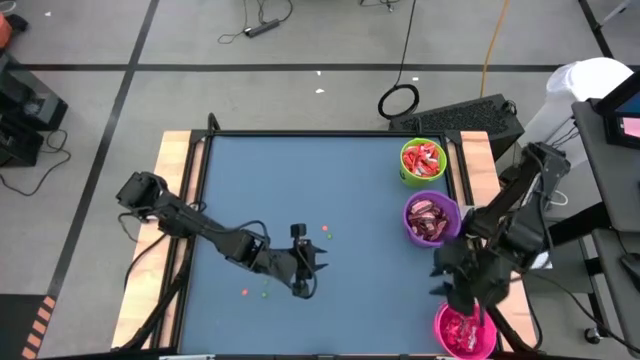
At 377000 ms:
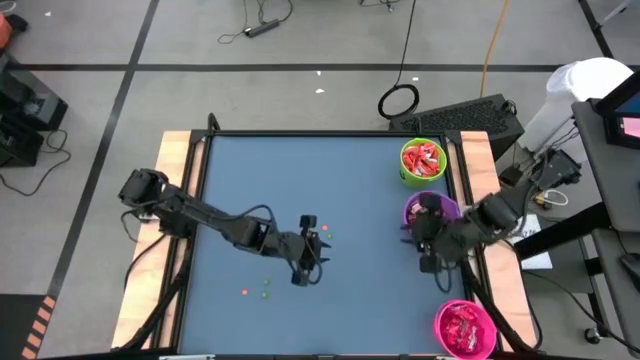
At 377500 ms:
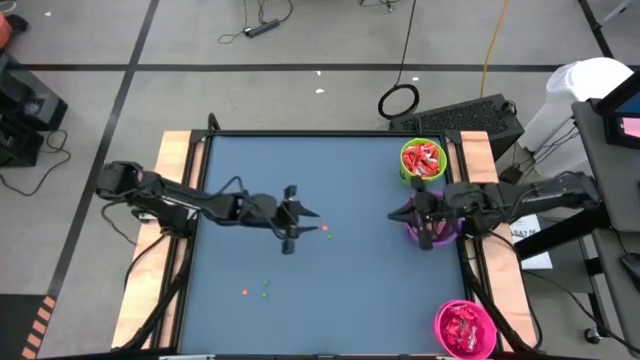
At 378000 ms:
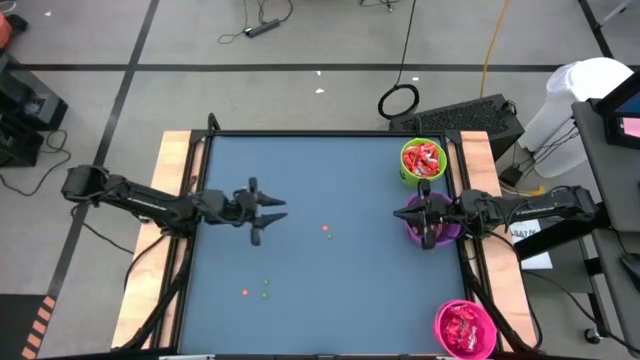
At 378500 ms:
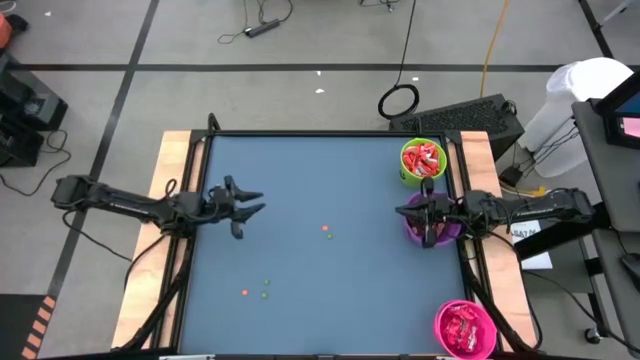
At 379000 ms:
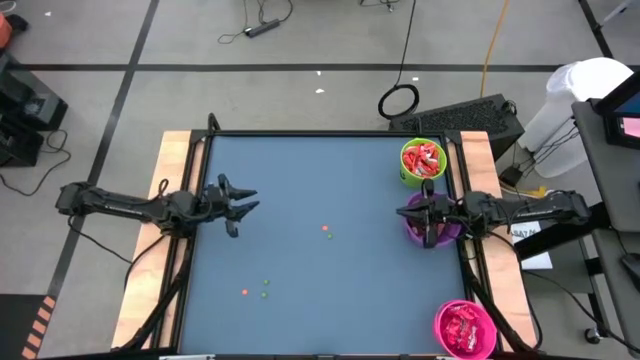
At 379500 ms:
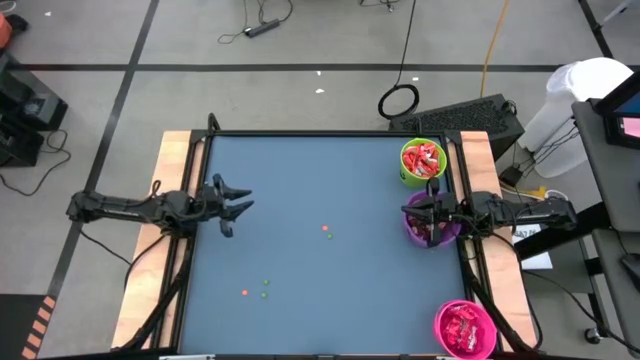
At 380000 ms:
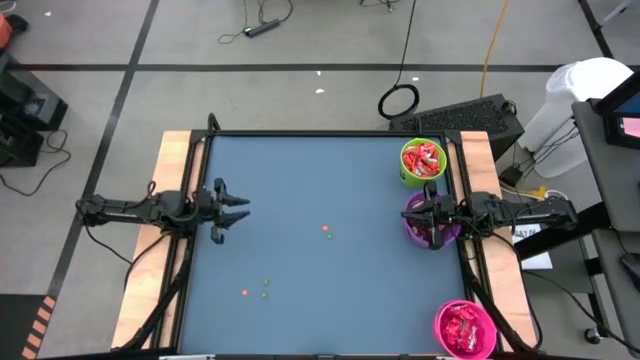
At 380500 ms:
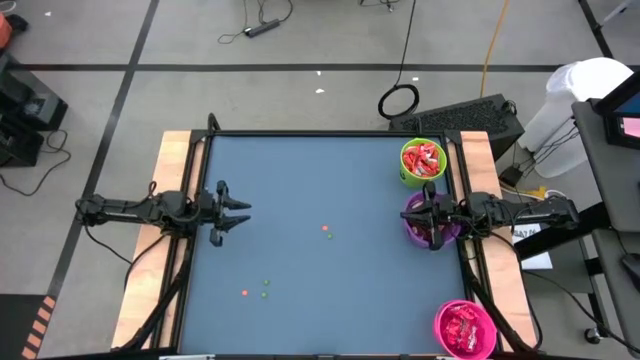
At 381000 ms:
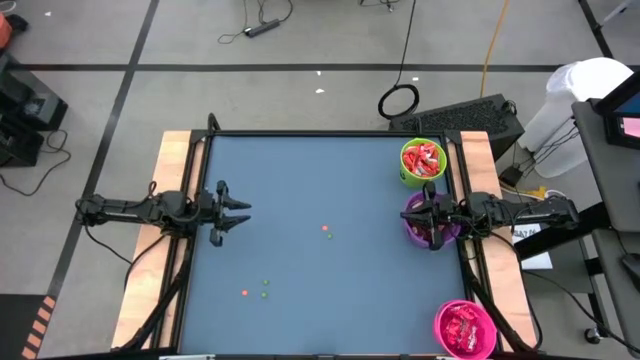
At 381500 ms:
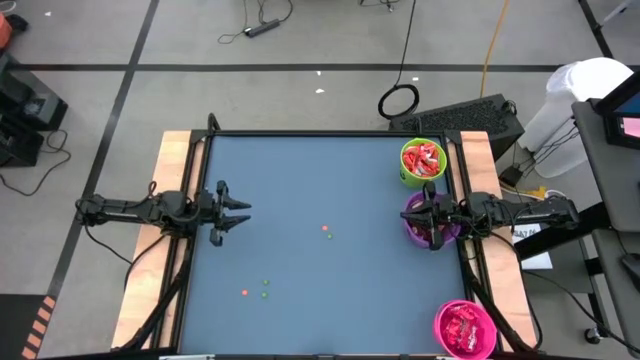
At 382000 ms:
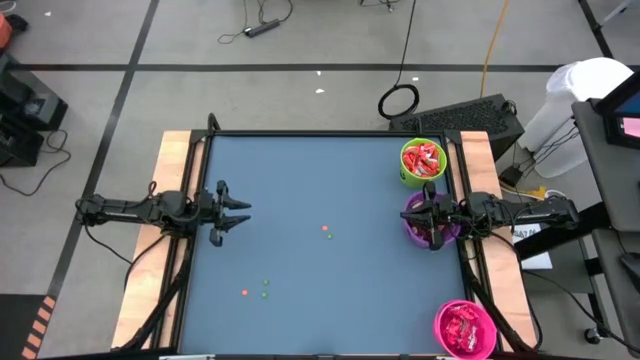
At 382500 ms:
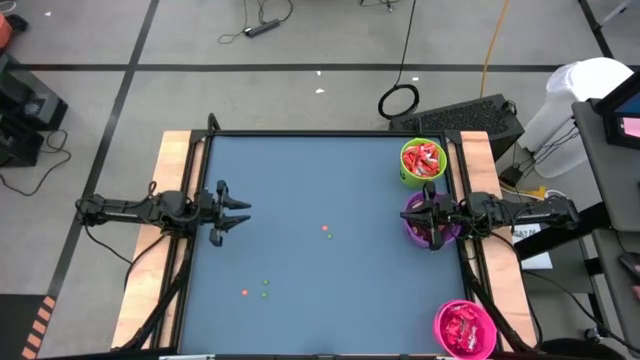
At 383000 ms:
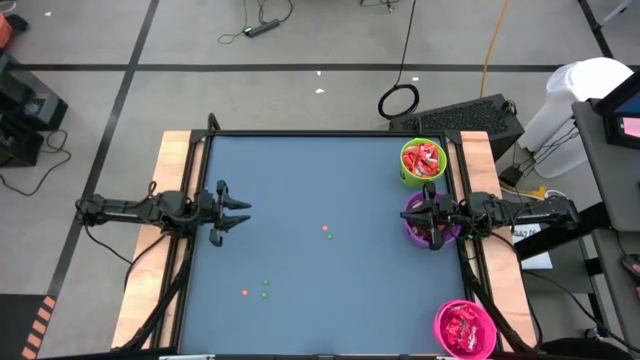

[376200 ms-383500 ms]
Task: Organize candy in baskets
Return to Home Position

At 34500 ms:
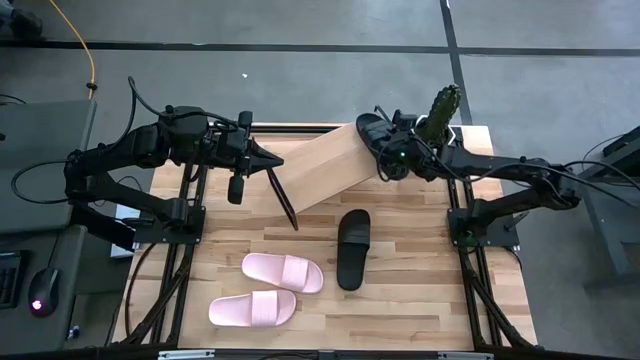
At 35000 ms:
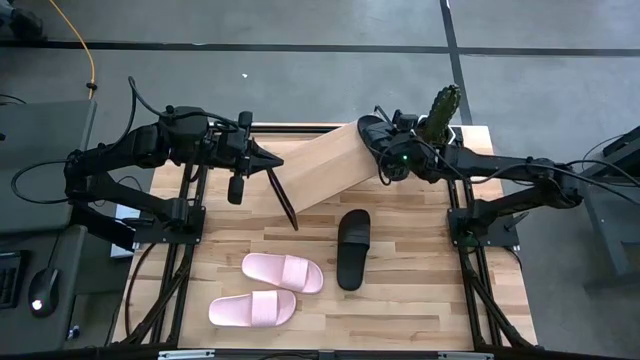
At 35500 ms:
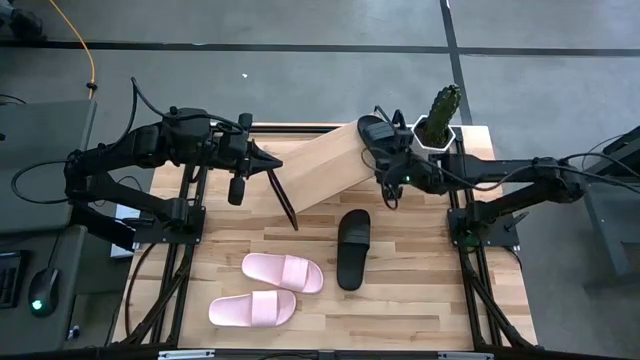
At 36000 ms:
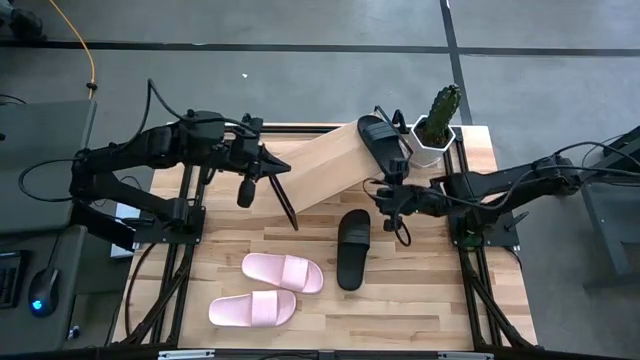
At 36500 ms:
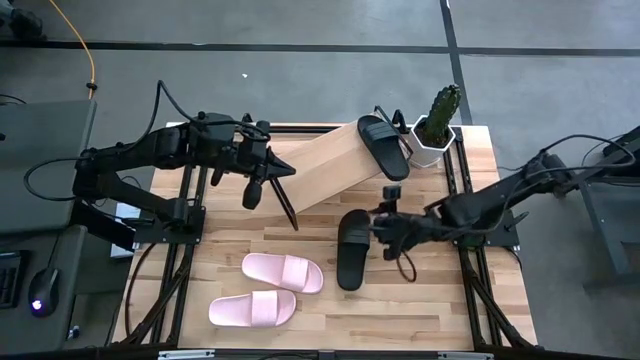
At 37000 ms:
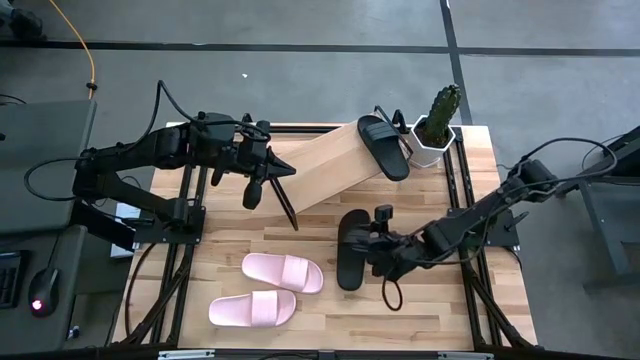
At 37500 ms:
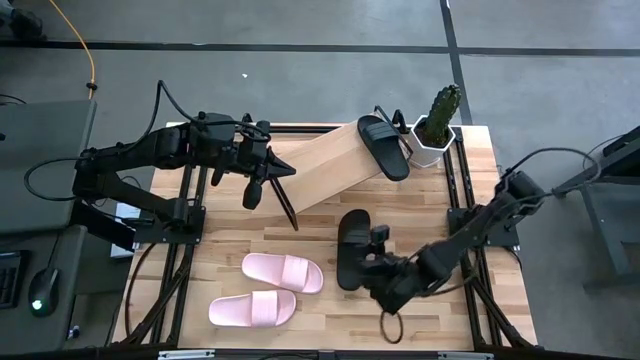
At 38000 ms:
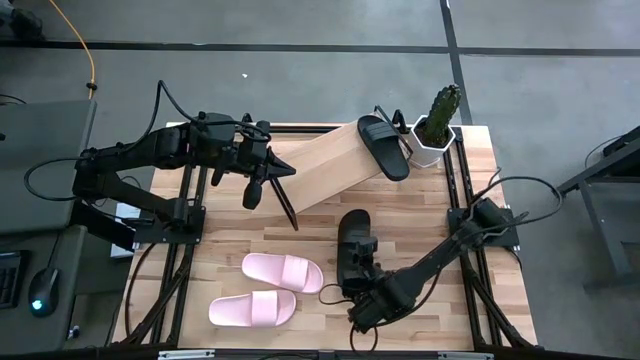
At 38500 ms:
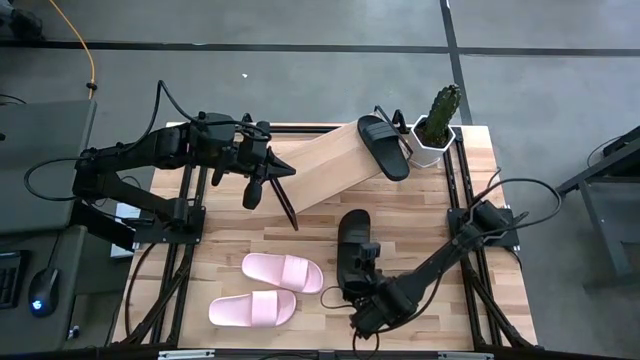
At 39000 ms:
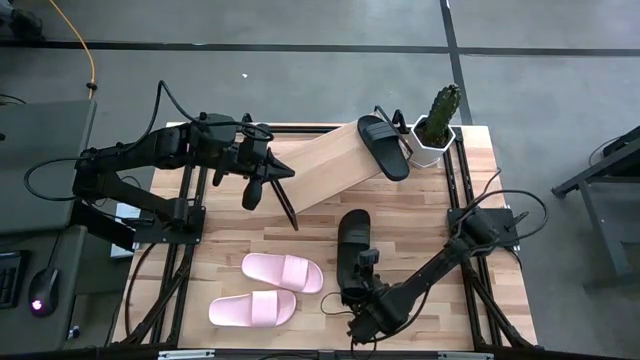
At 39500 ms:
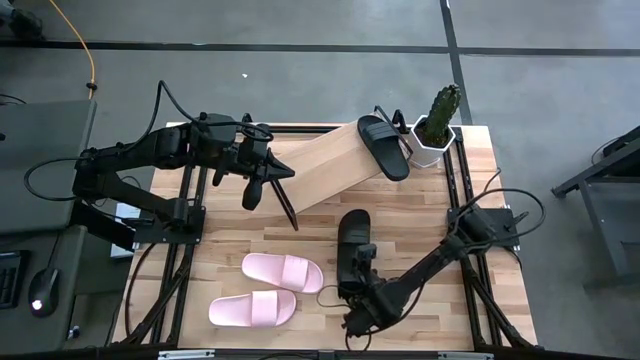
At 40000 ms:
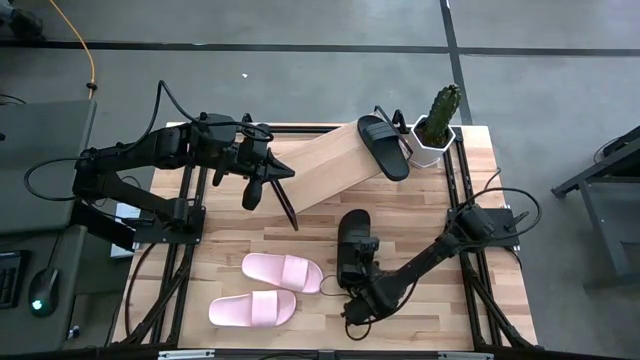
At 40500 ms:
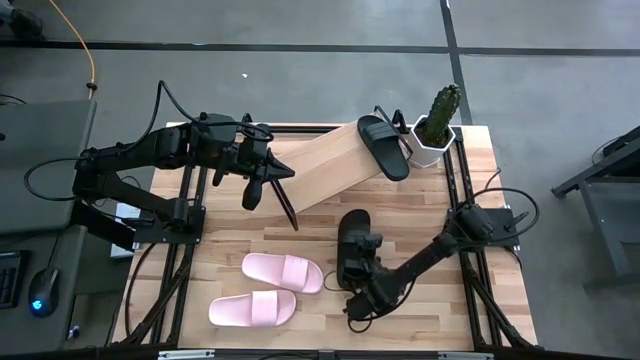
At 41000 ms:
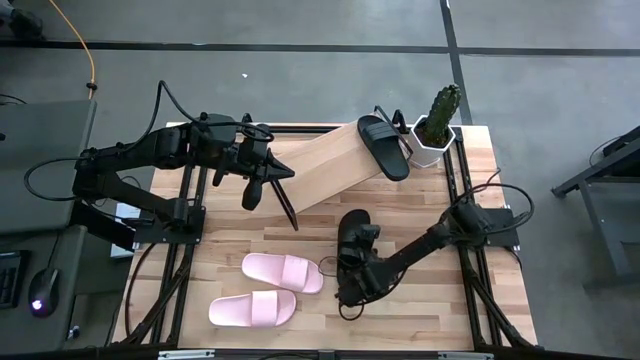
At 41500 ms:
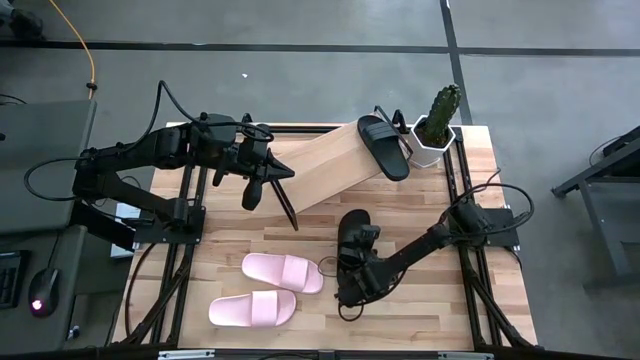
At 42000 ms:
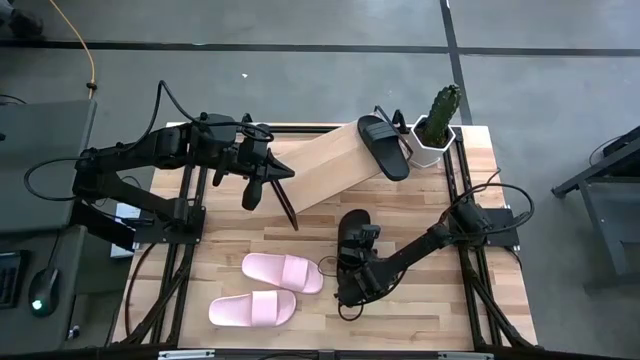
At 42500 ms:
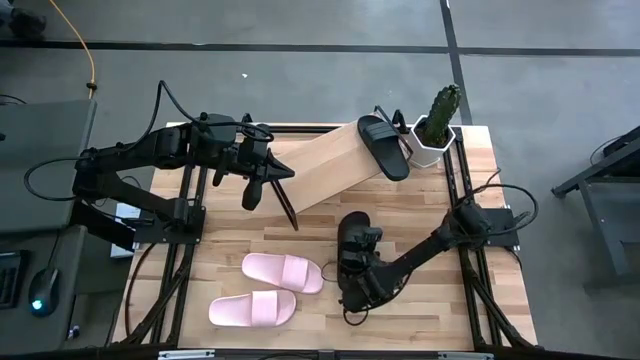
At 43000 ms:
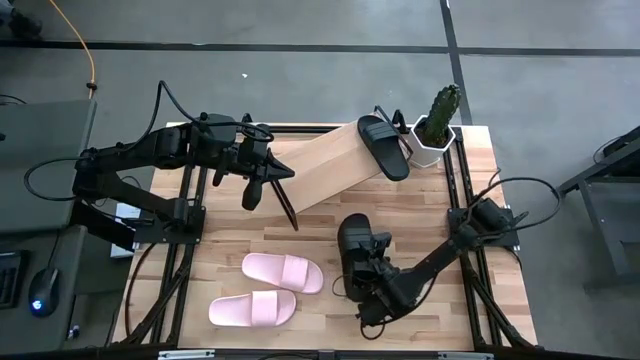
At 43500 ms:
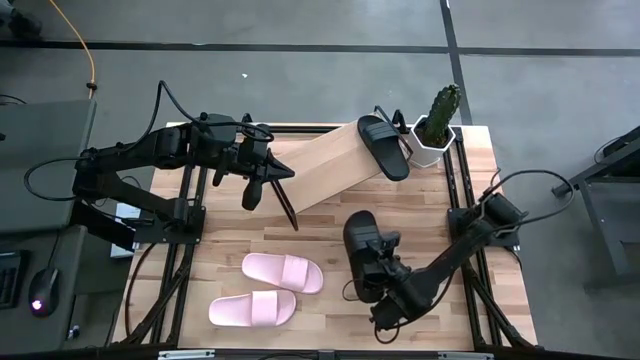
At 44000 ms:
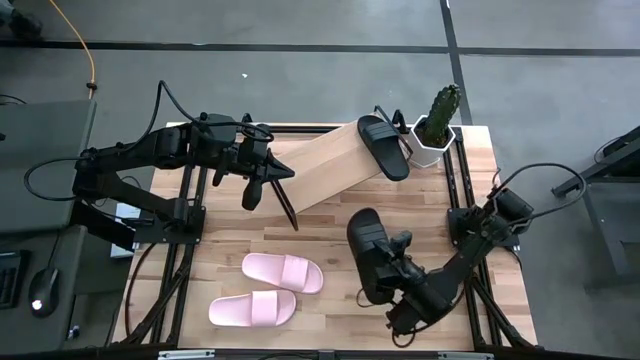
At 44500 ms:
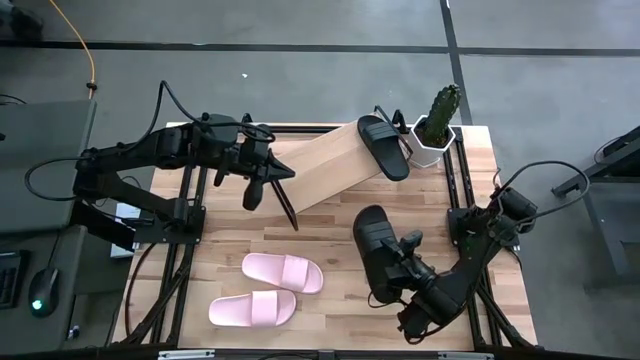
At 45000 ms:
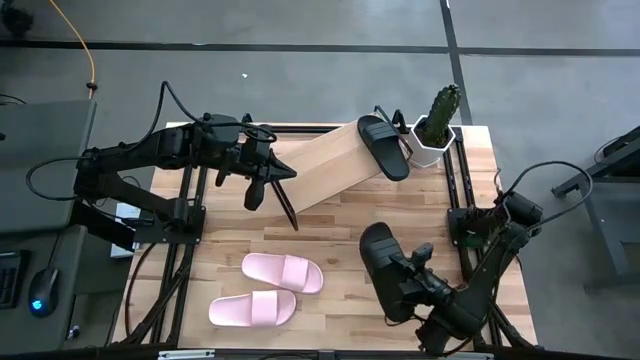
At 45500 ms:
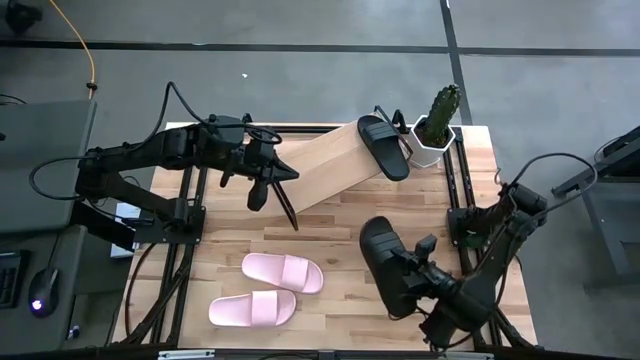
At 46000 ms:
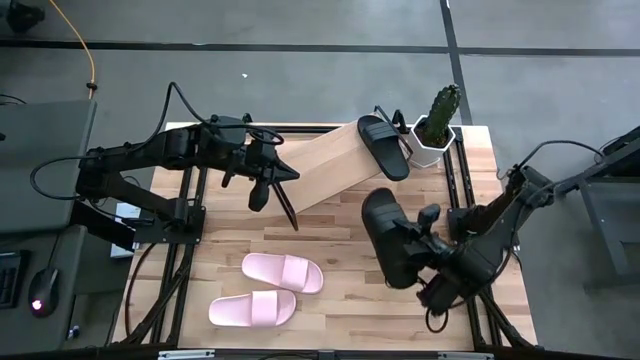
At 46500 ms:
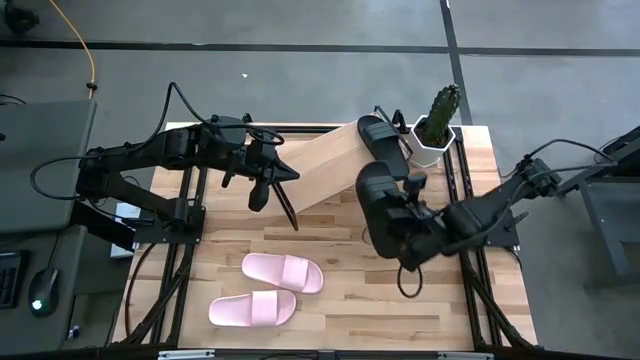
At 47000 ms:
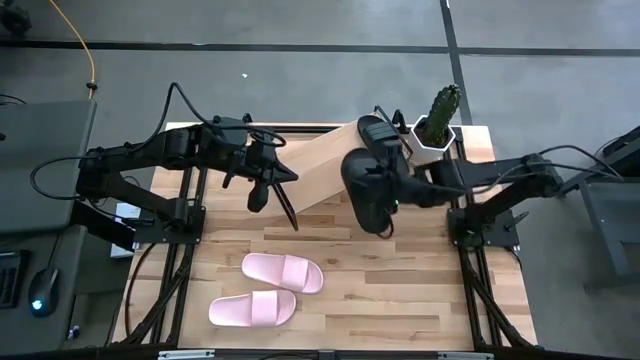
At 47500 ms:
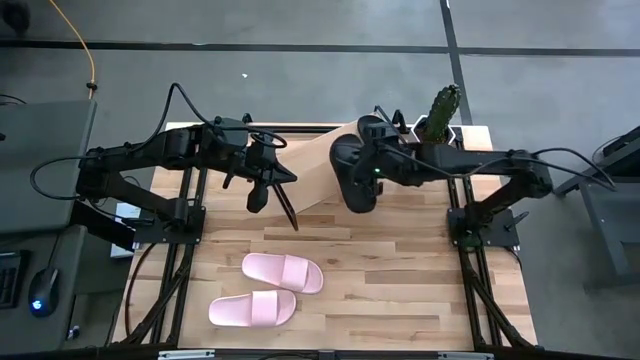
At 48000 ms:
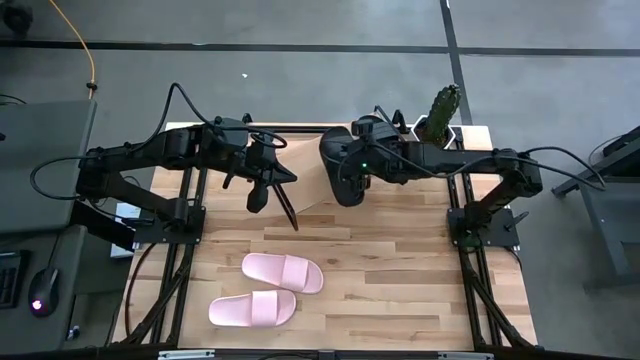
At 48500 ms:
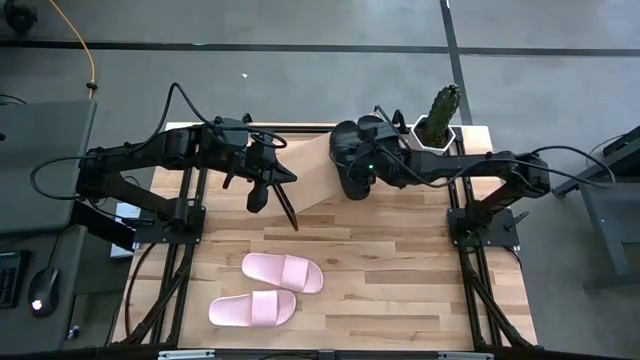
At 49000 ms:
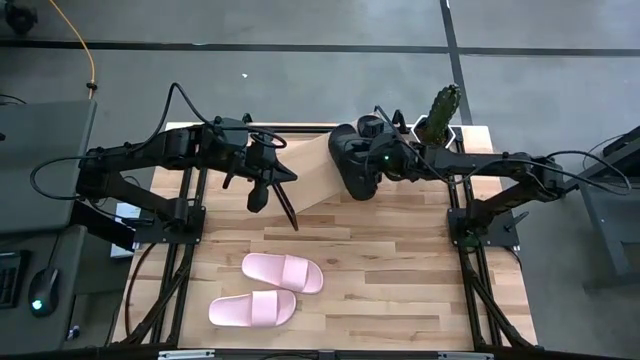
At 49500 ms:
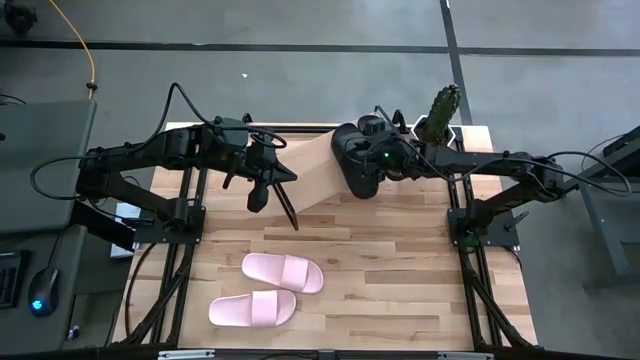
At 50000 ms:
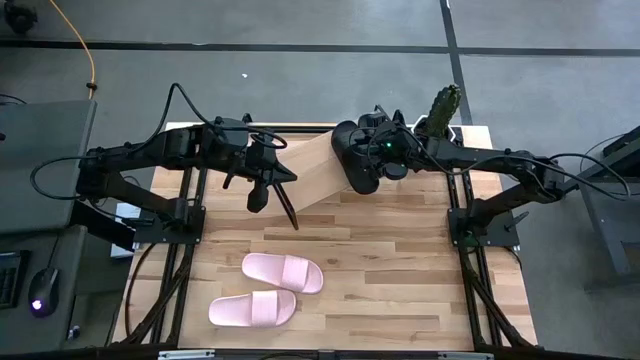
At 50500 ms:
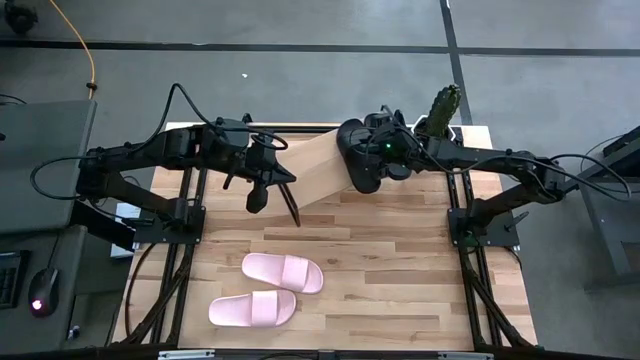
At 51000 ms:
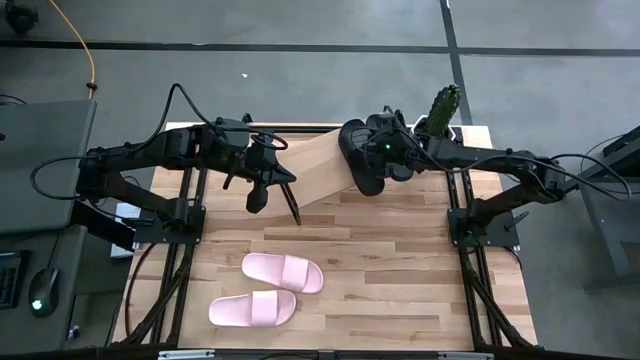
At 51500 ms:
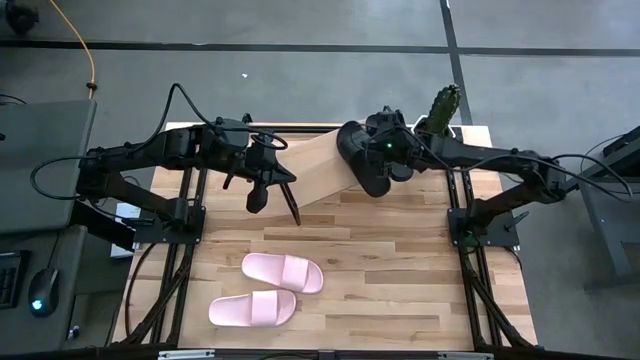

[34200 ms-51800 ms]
Task: Pick and place slides into the shelf
Put the black slide on the shelf
